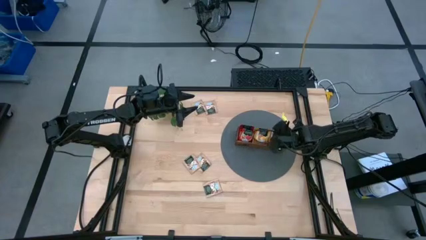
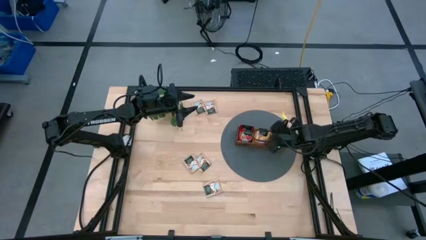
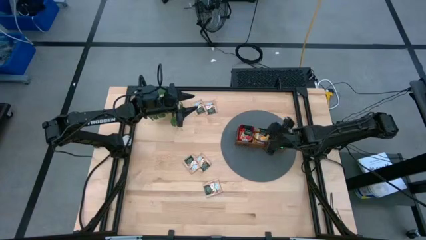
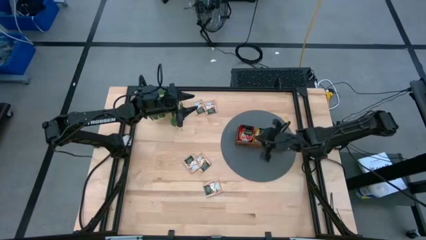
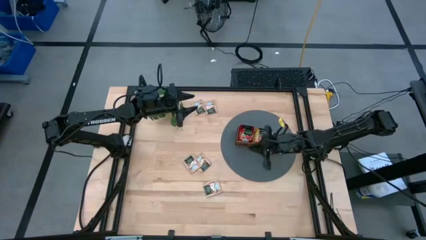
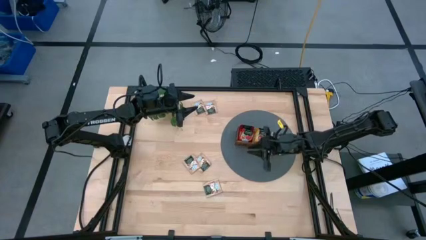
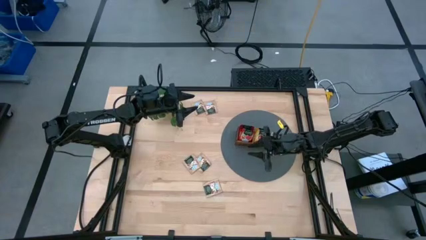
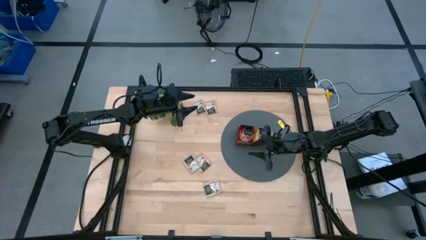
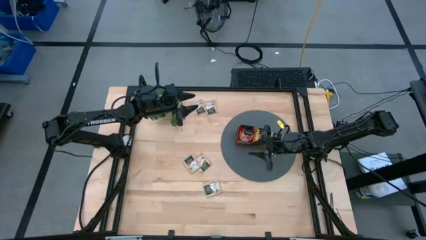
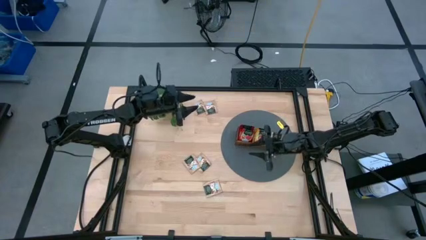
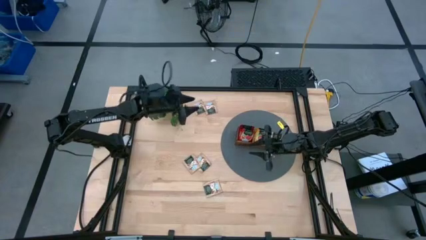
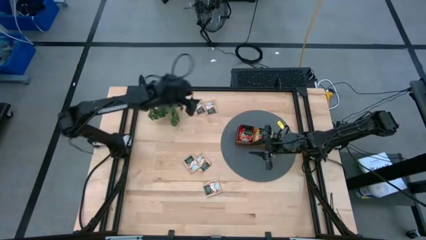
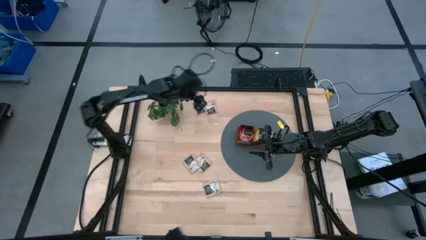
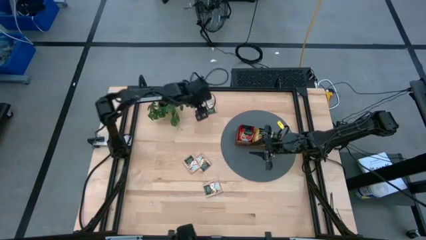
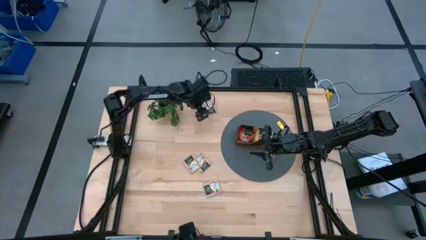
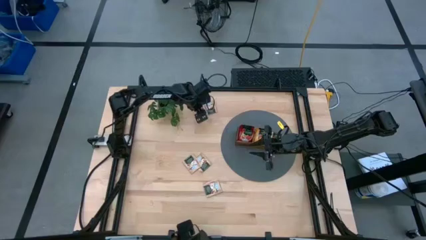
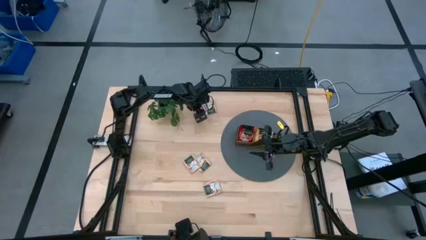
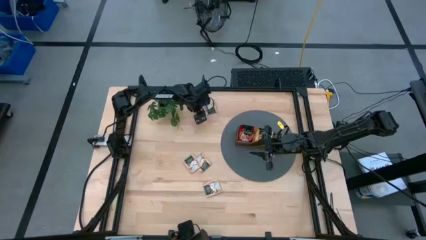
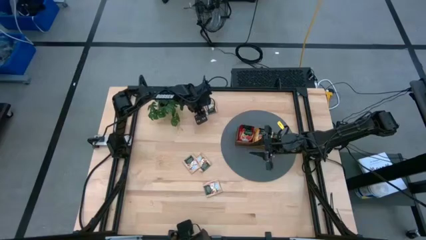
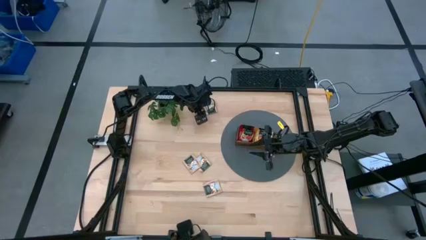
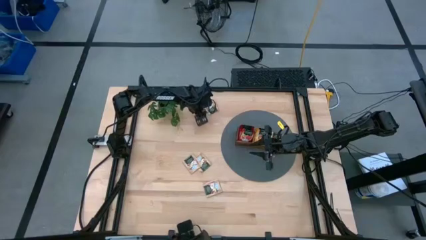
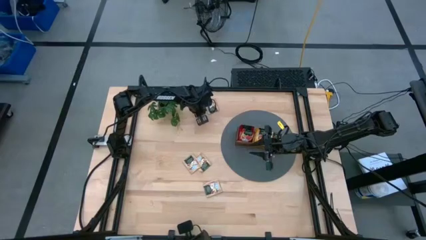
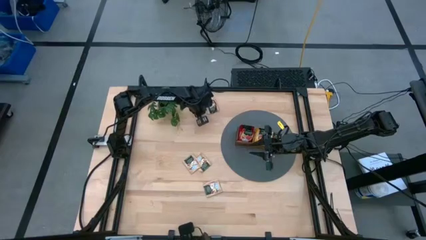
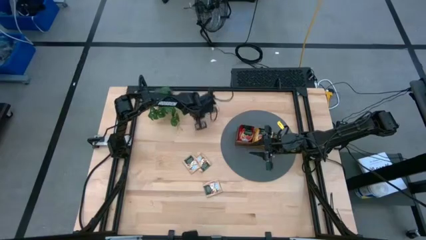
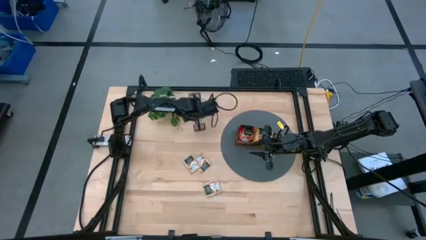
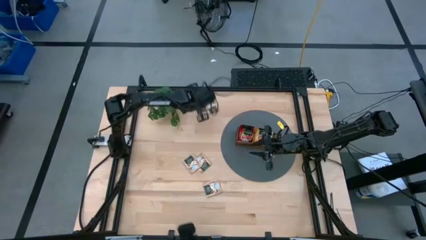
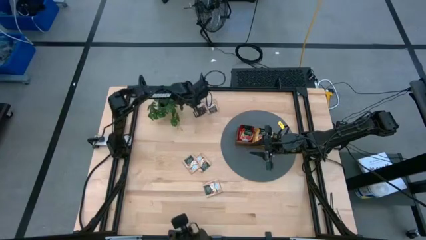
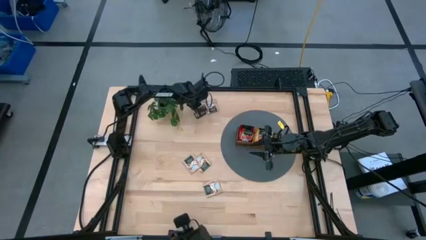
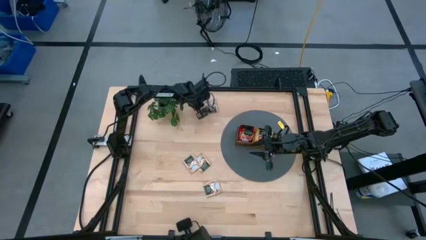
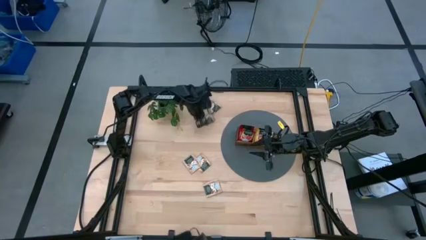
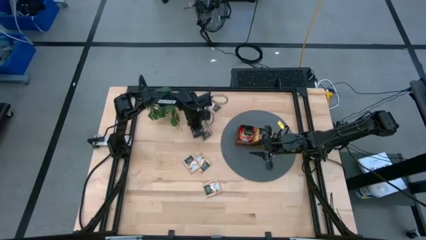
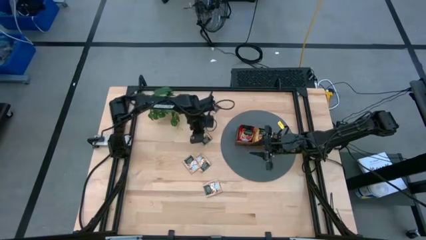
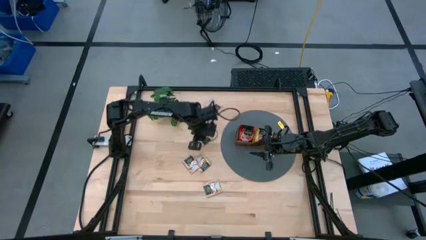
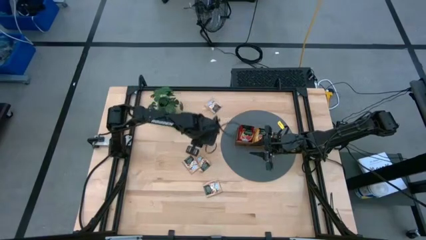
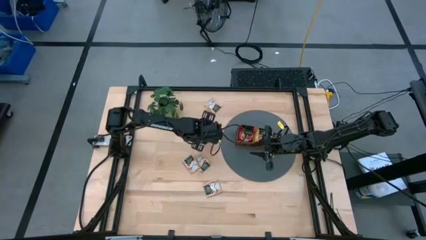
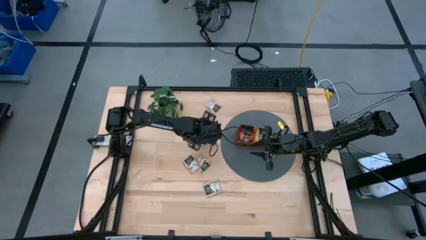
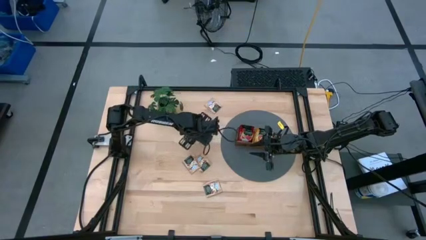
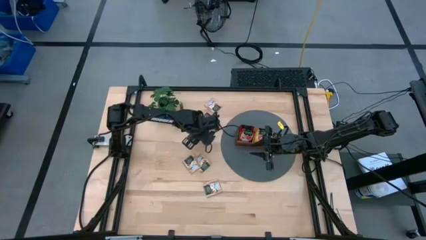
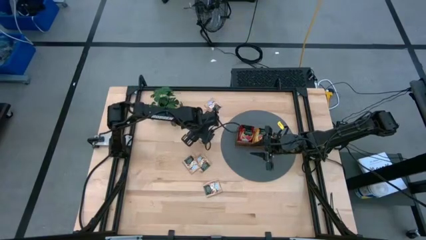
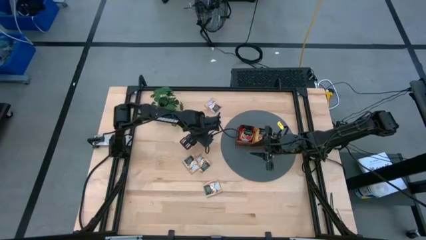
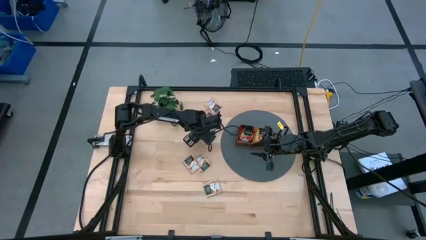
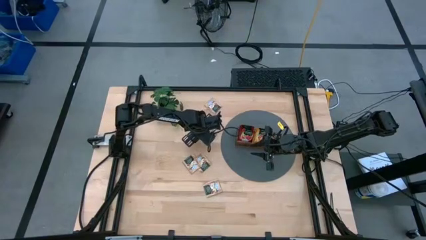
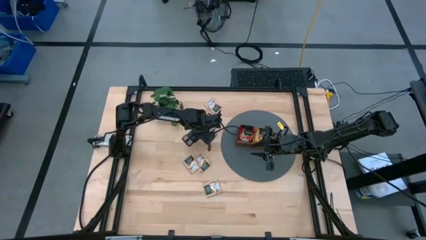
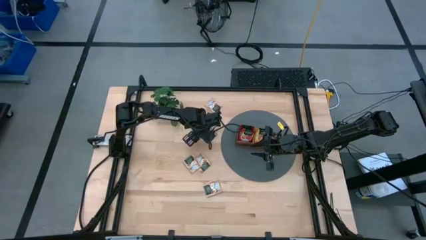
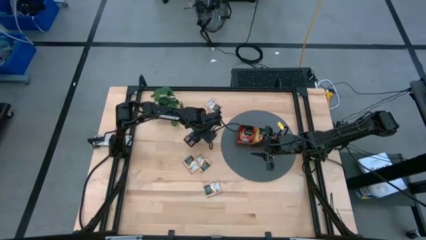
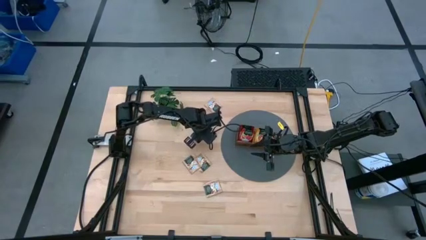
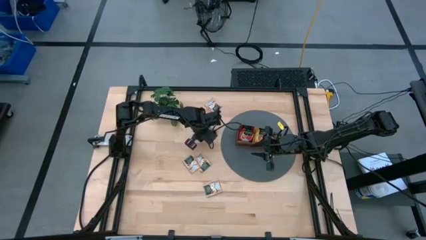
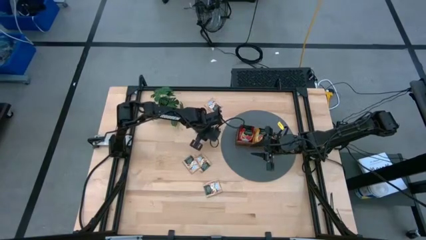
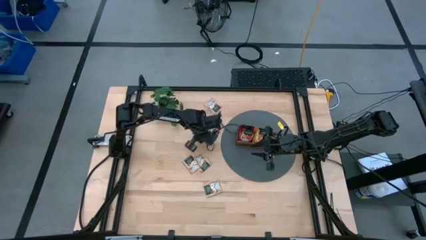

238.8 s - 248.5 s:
Task: Pick & Place Tea
Put the brown tea bag into the right section of the wooden organizer

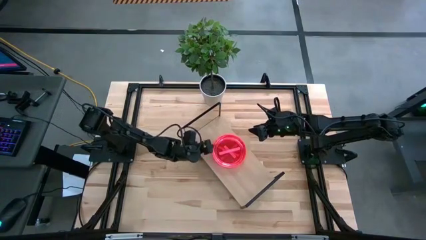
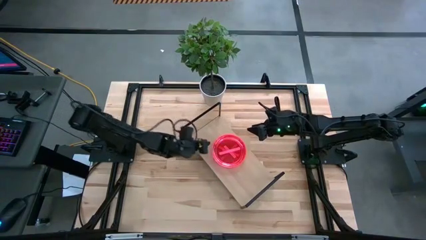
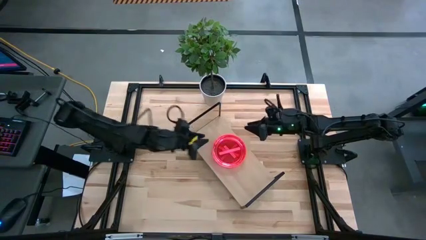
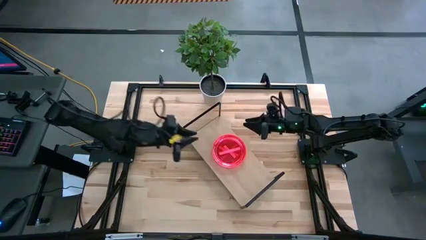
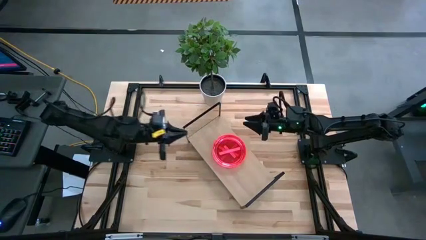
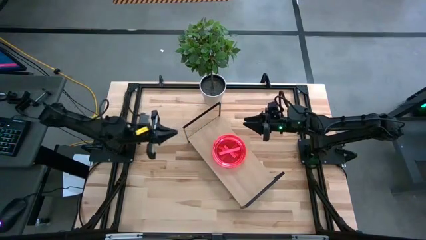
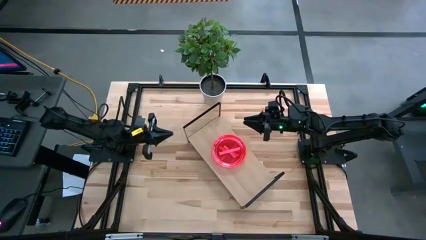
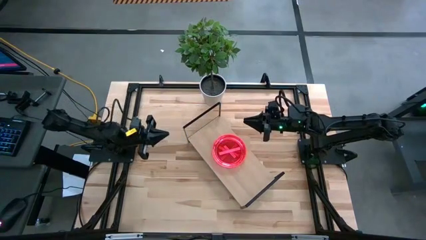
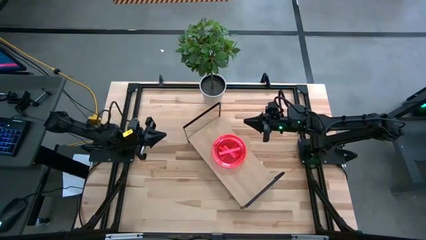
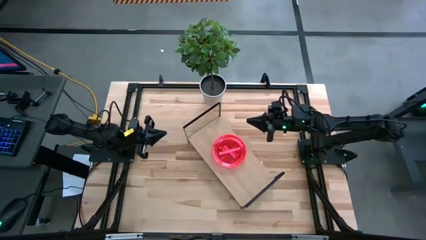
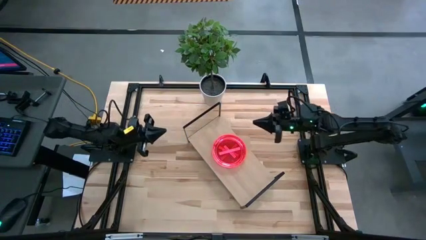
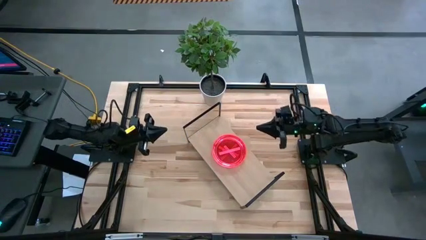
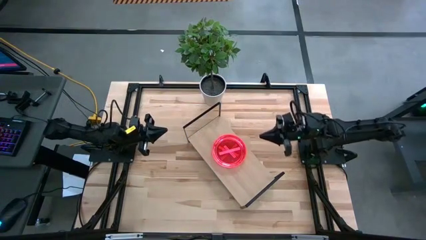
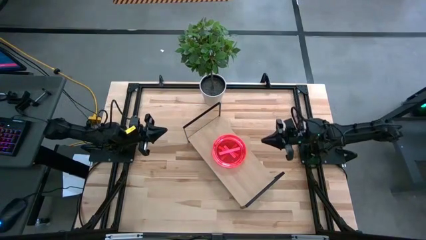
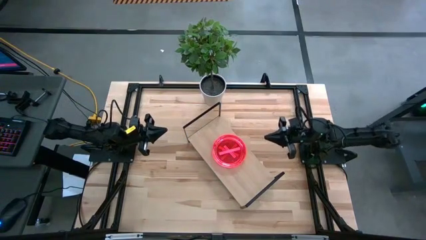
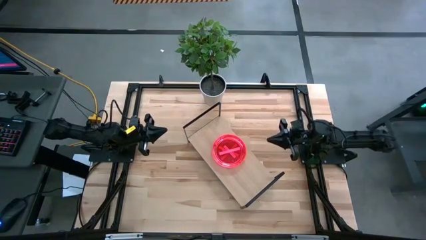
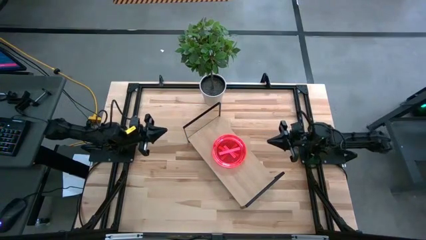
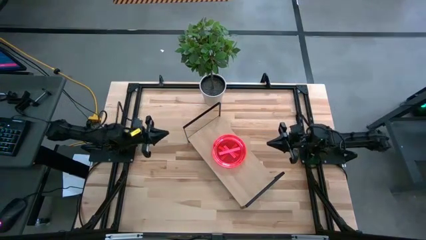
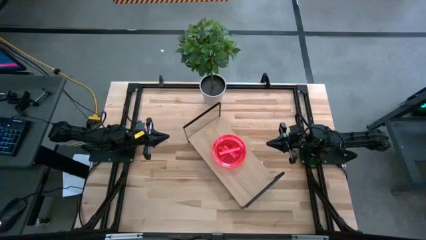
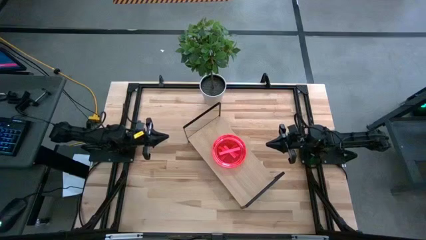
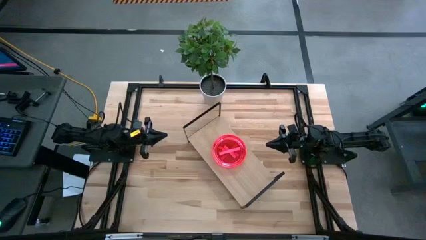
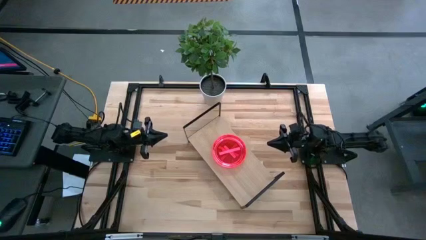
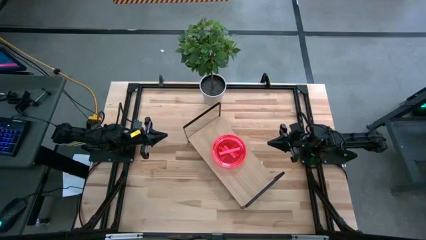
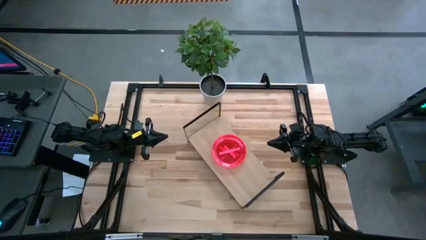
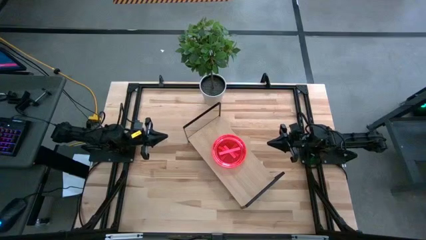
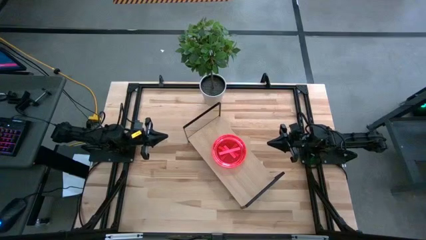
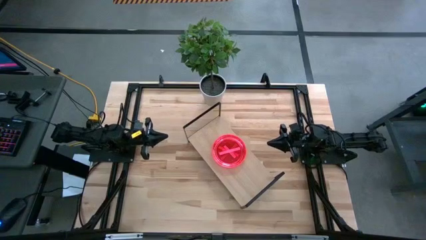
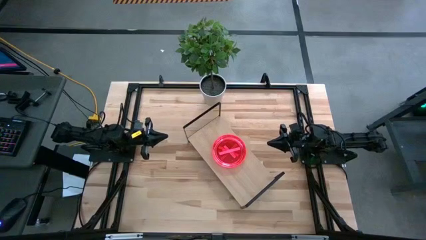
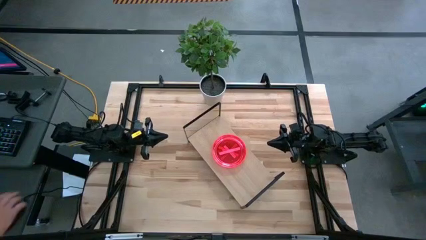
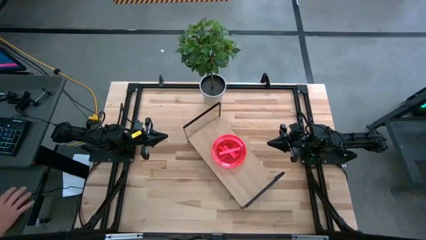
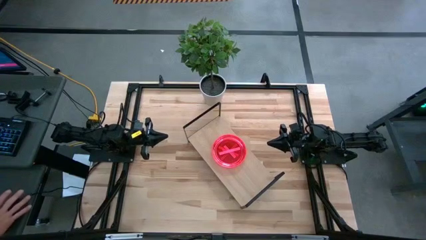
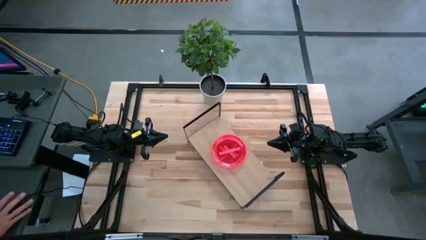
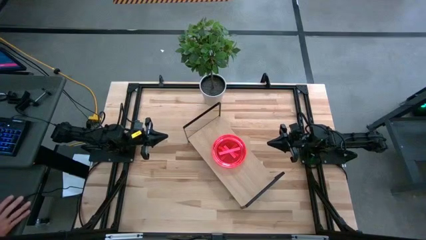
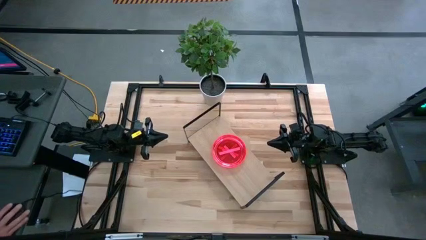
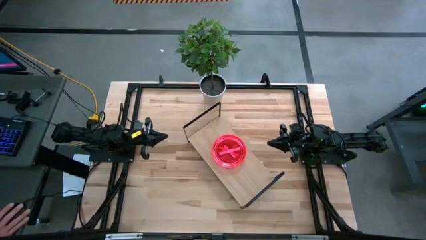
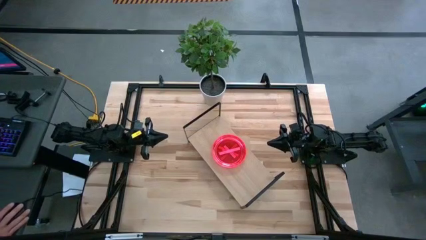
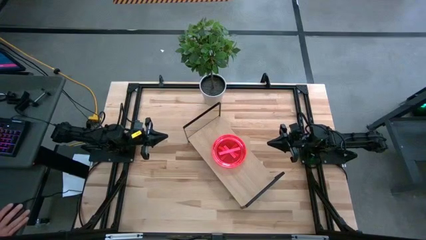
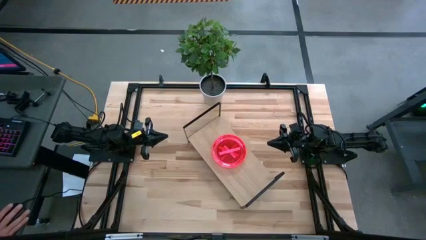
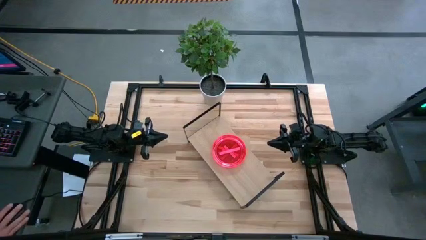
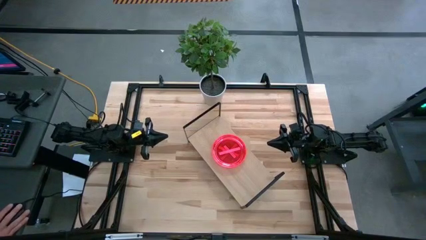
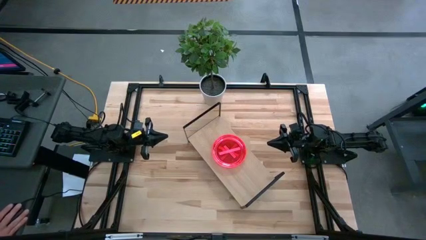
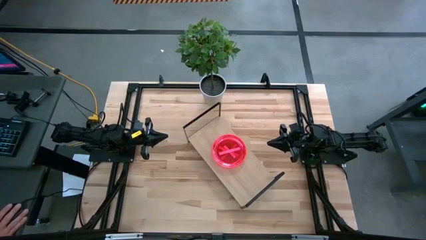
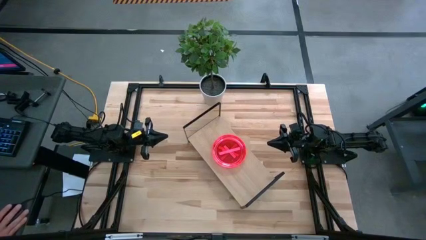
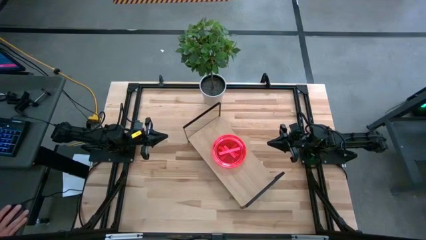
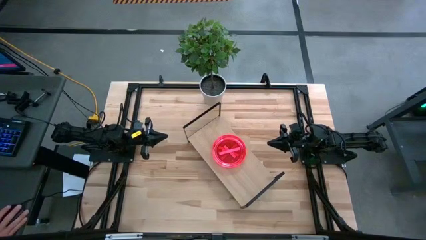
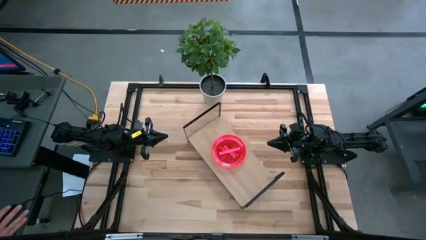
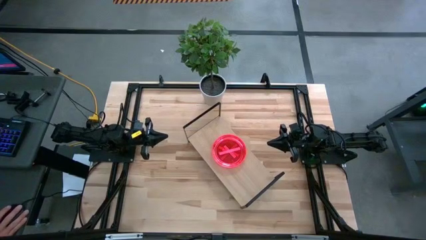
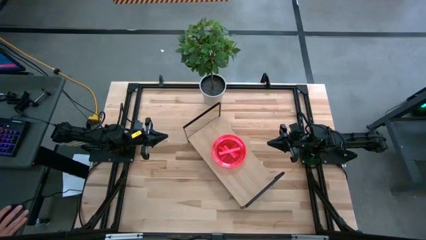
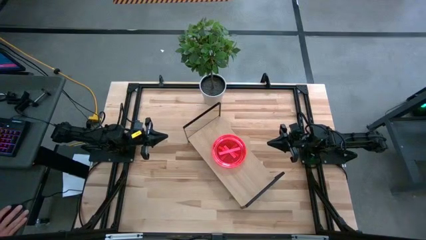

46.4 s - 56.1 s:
Task: Place and stack plates onto a shelf
Return to Home Position
